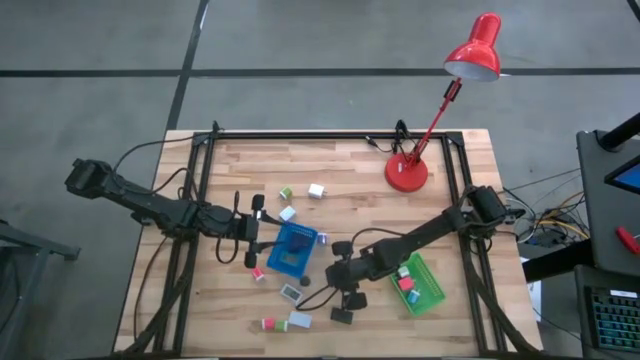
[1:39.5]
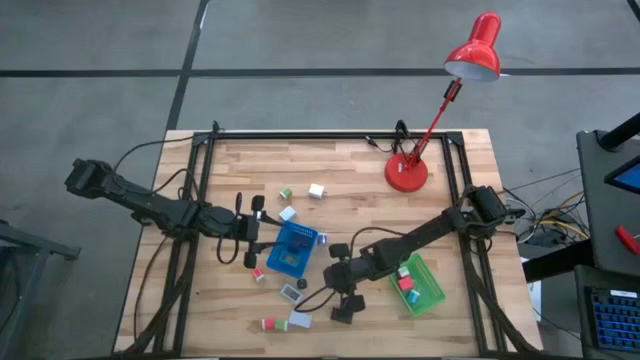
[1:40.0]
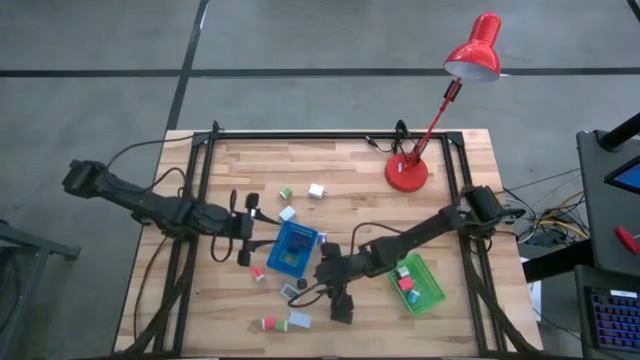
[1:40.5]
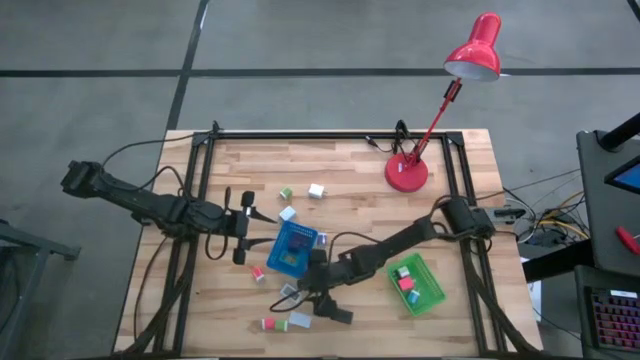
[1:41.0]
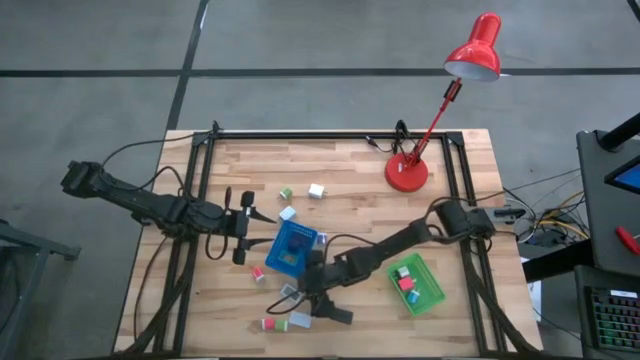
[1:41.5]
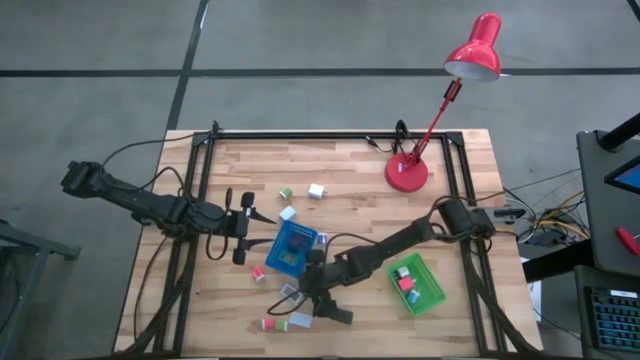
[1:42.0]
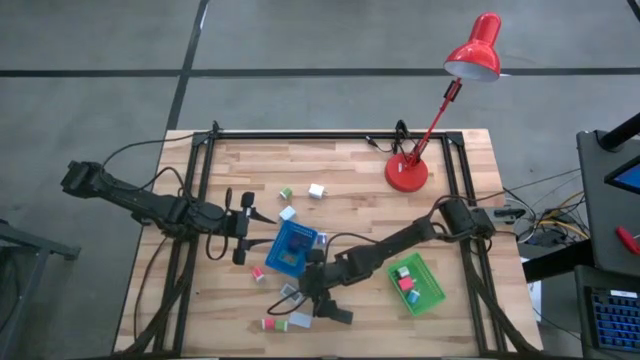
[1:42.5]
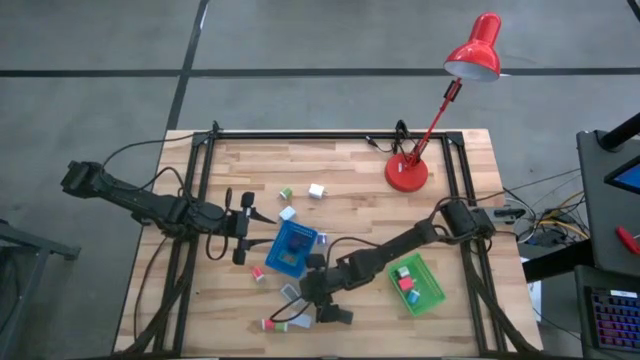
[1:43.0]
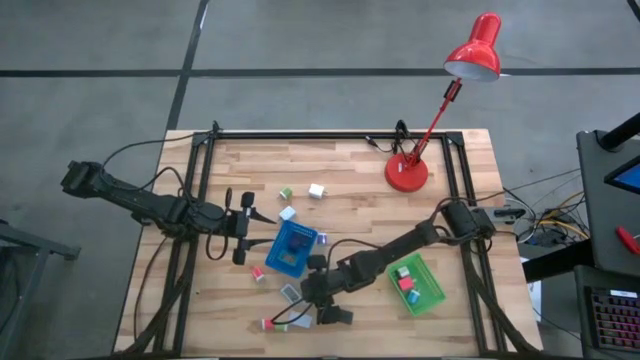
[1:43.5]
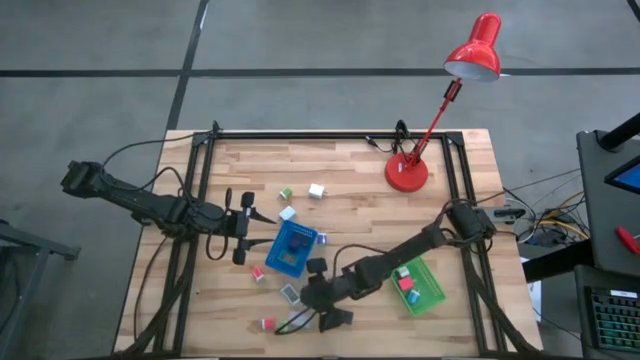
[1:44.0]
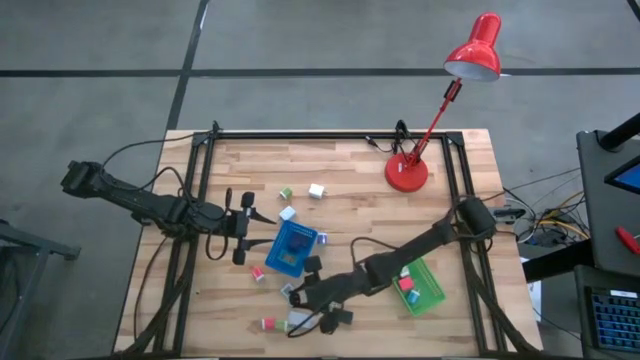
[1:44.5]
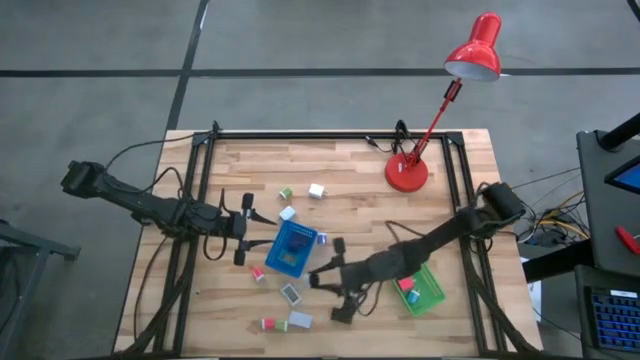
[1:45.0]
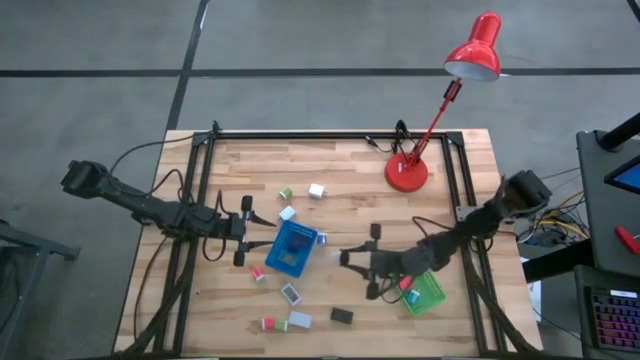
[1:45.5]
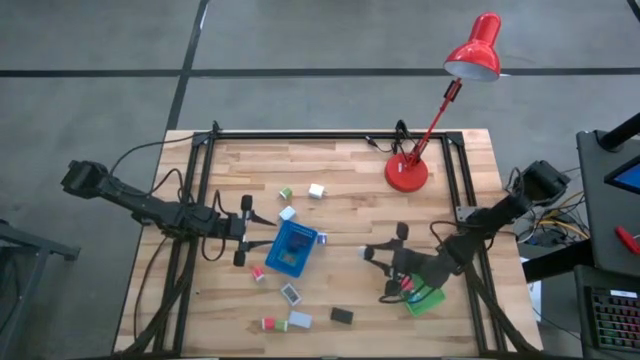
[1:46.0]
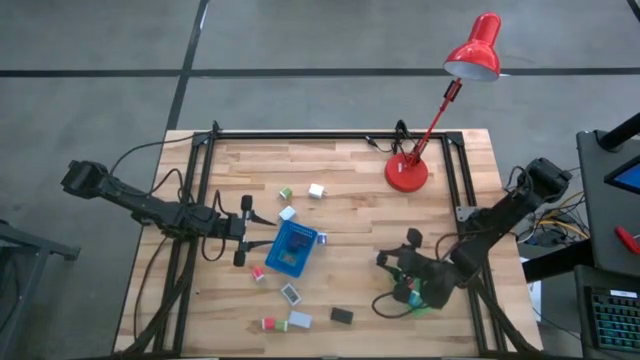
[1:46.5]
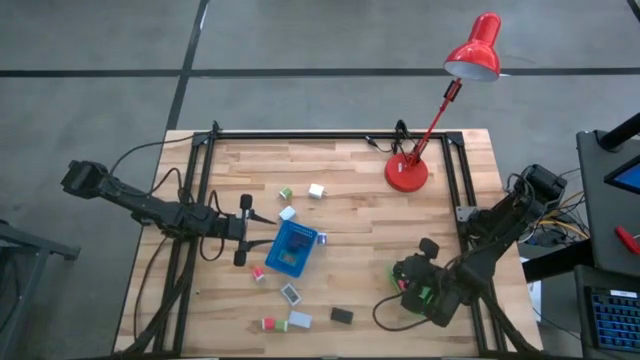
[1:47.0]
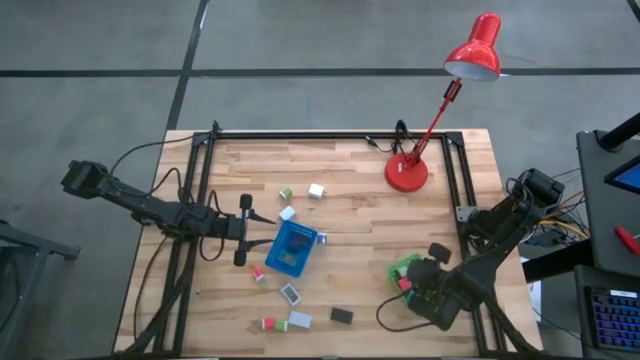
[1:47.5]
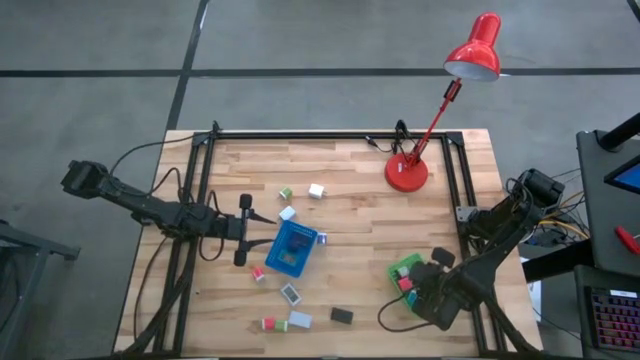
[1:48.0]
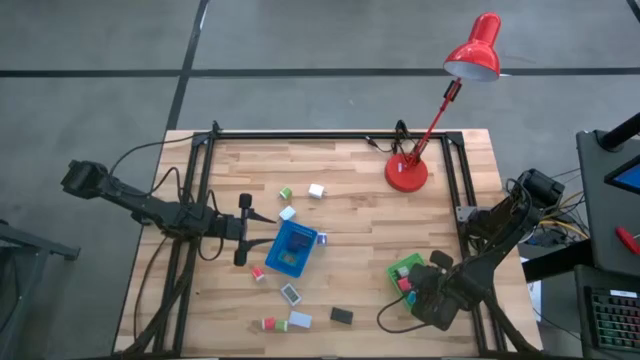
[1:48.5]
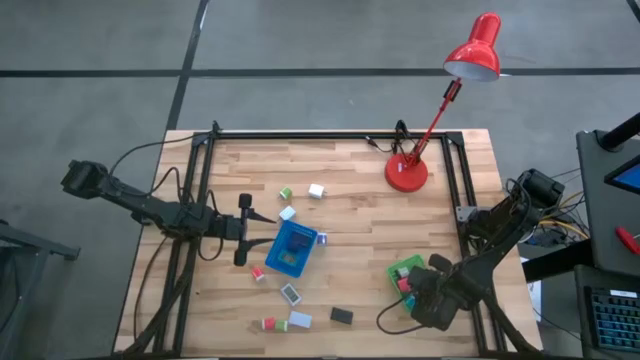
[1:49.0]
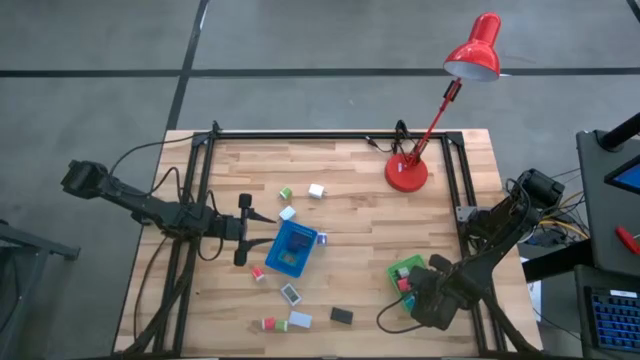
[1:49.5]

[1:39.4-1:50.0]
Task: Pick & Place Office items
Put the white black charger adapter into the green bin

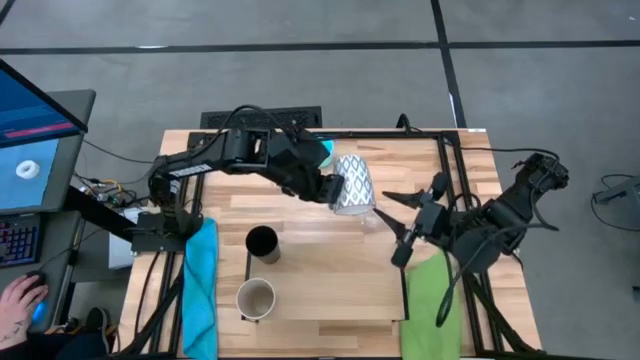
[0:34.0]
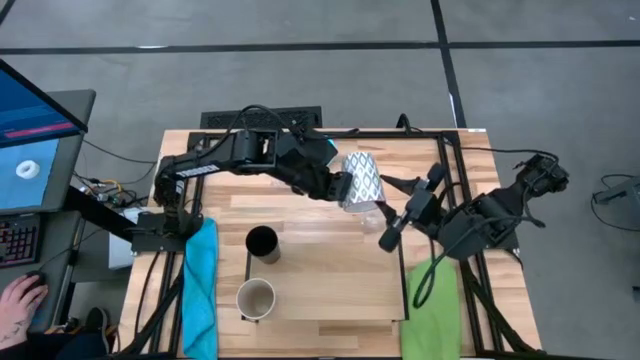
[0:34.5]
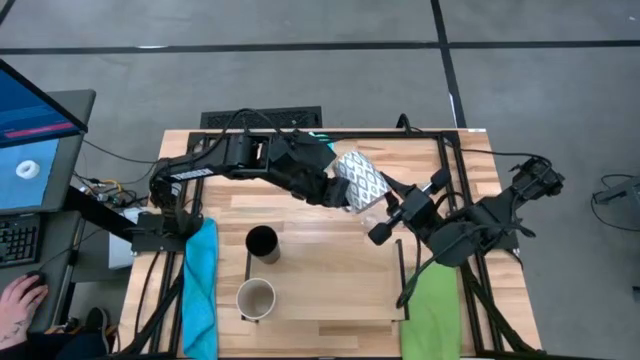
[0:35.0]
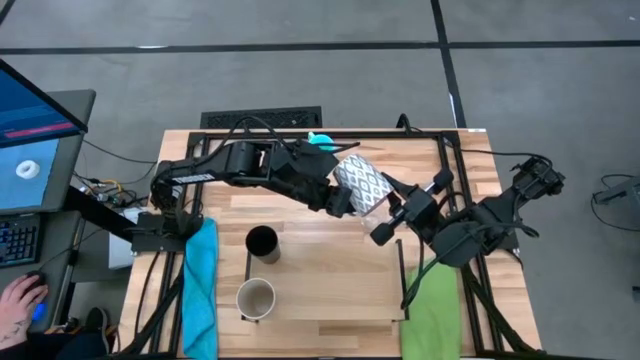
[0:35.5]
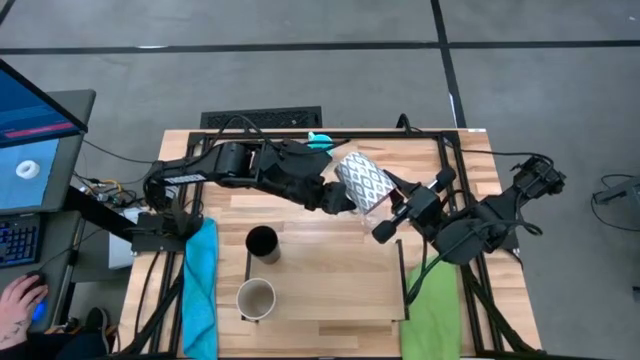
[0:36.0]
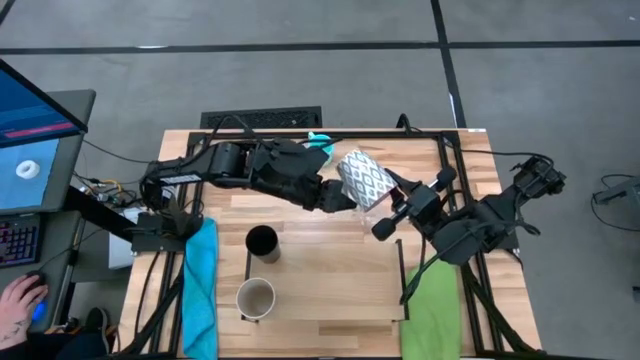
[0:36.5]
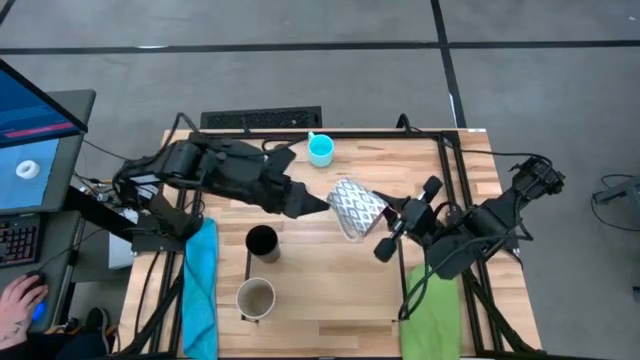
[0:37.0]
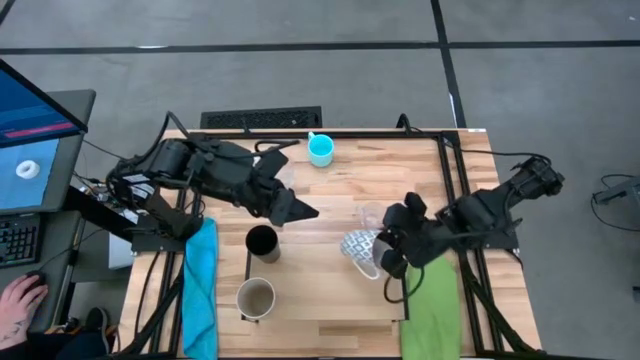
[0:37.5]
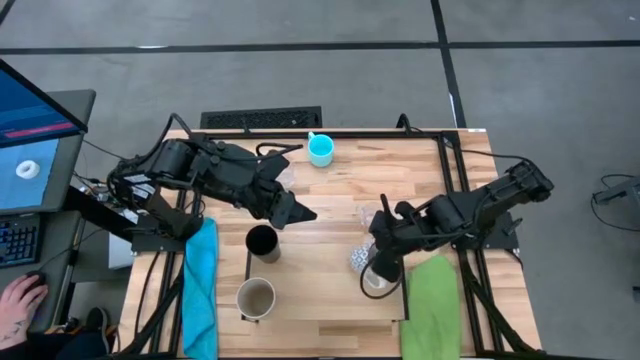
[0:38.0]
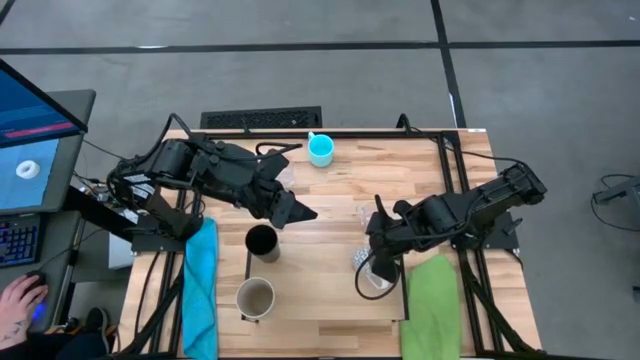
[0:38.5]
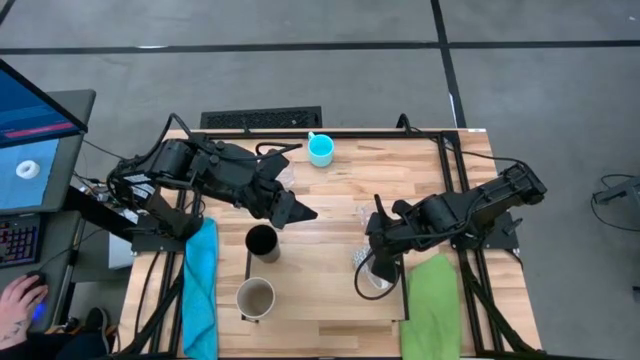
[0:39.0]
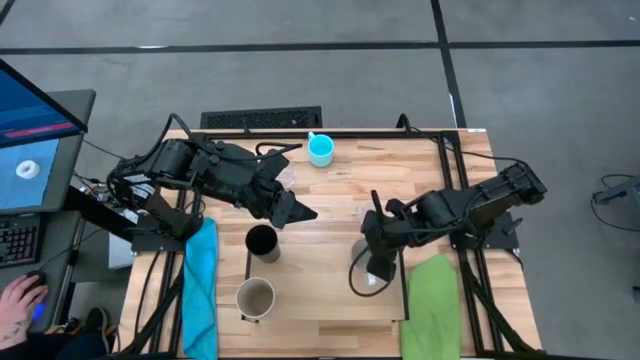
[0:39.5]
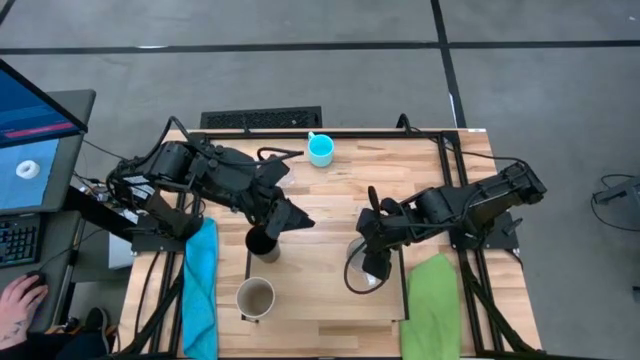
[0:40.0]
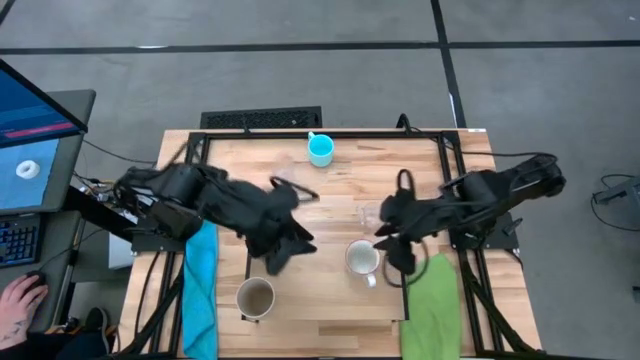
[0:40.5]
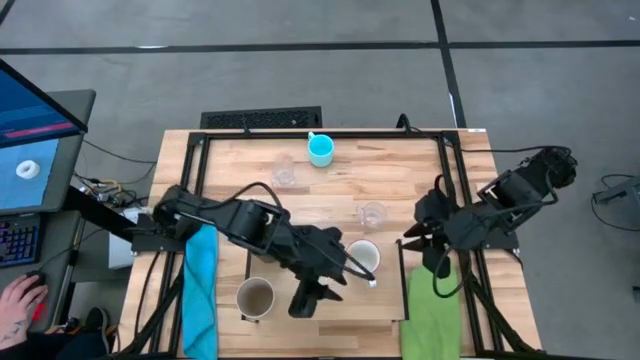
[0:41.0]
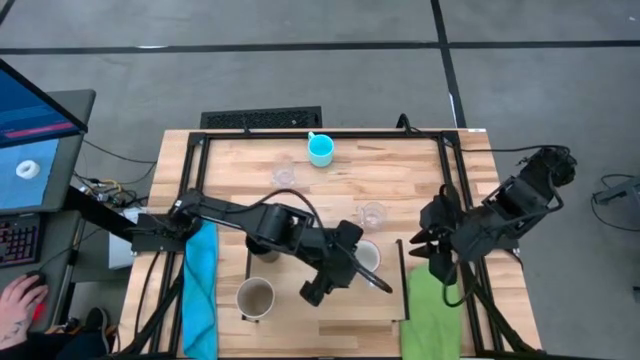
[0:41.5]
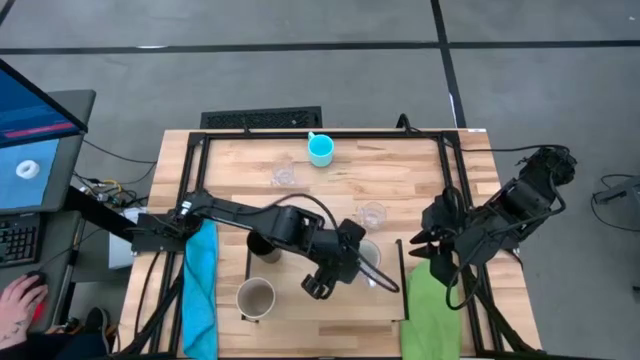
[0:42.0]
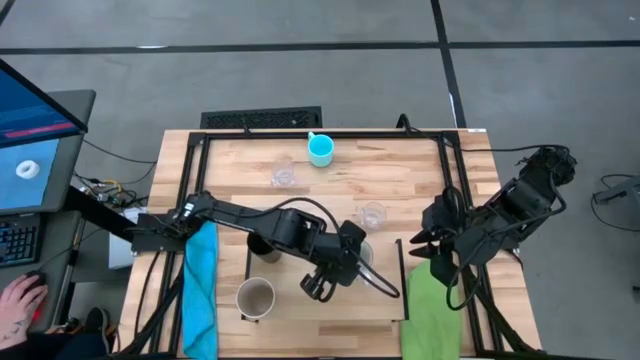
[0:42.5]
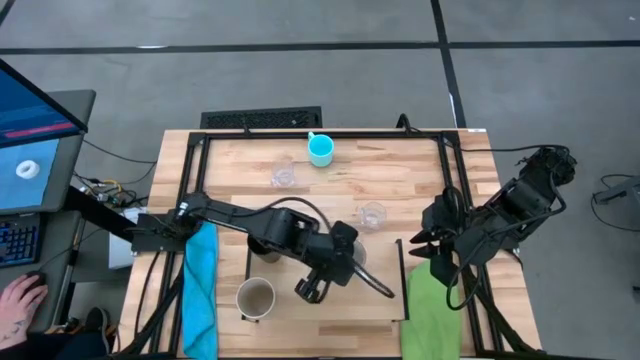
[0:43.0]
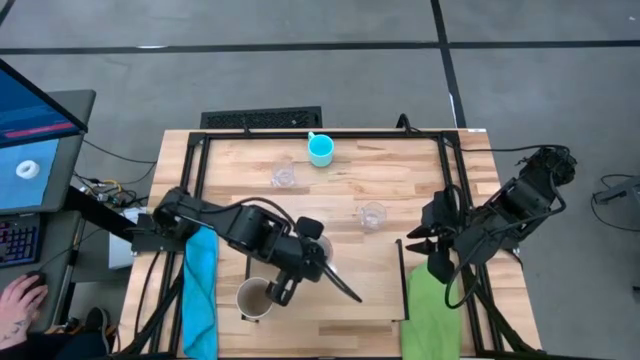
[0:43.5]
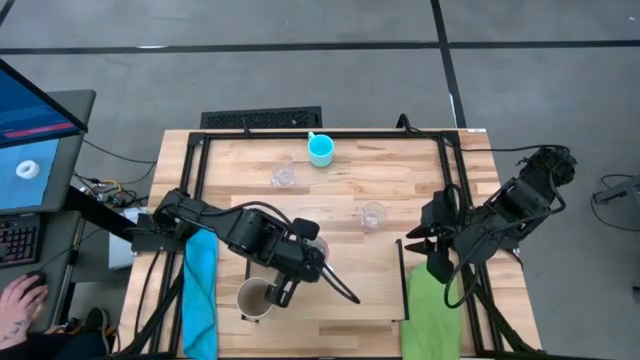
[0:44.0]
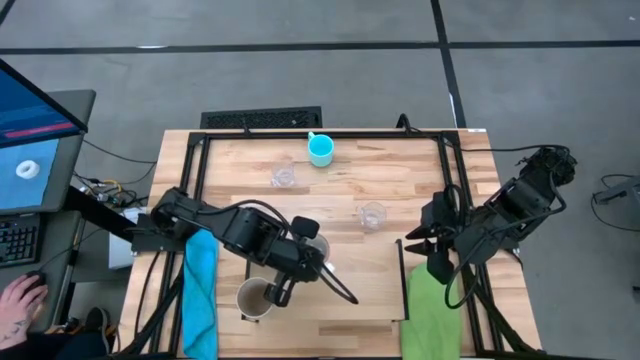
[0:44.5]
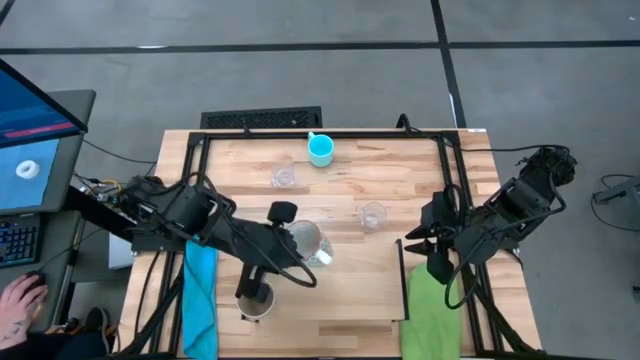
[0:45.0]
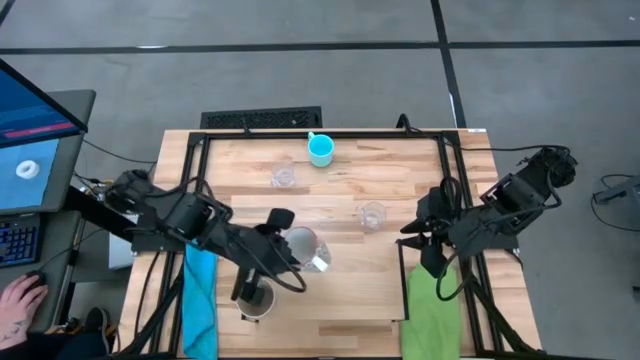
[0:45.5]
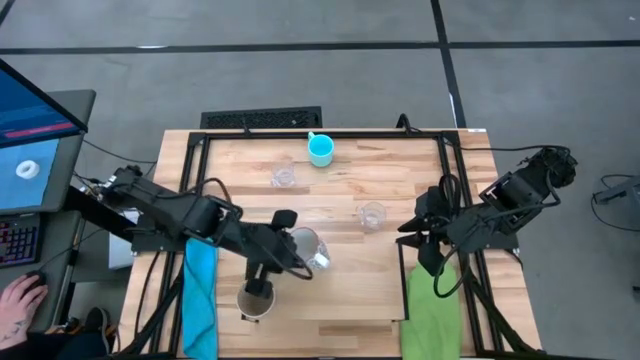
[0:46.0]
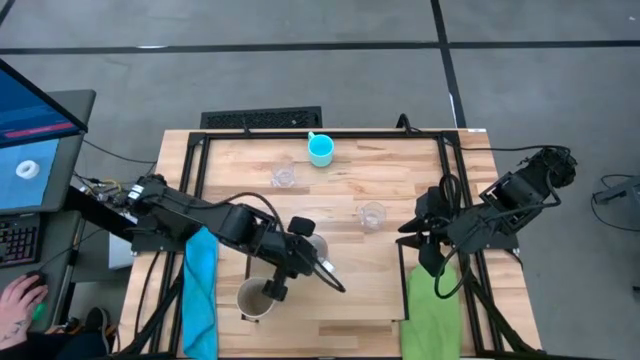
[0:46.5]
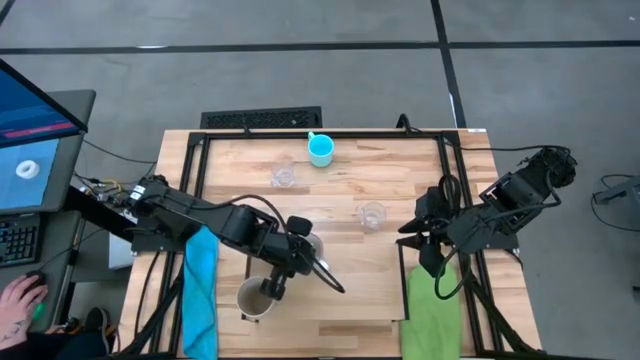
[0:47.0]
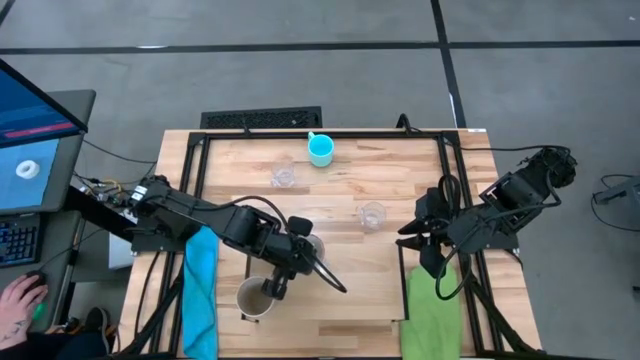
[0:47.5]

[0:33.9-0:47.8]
Task: Stack small to large cups/mugs on shelf
Put the gray patterned mug on the shelf
